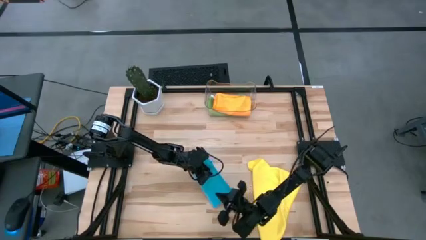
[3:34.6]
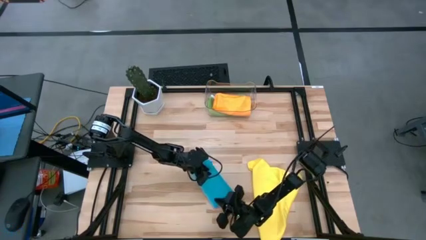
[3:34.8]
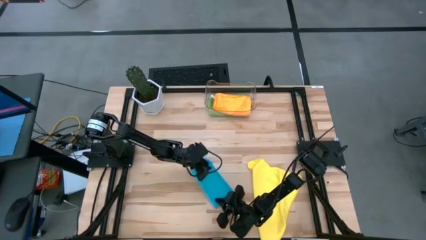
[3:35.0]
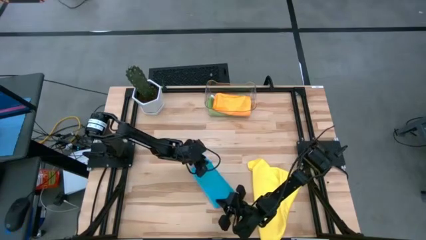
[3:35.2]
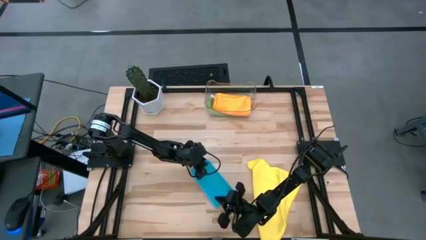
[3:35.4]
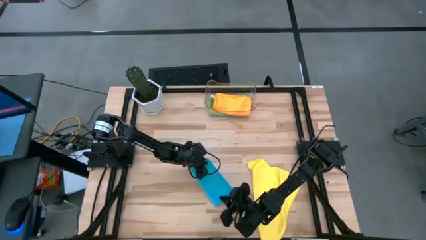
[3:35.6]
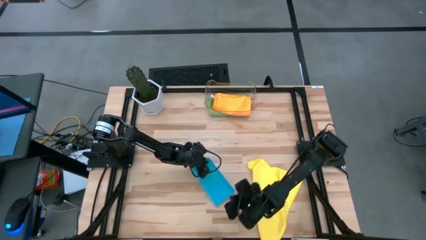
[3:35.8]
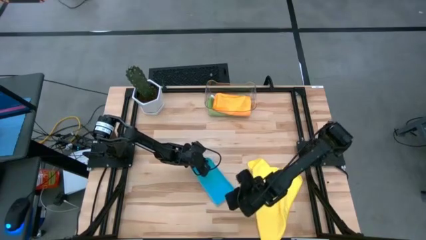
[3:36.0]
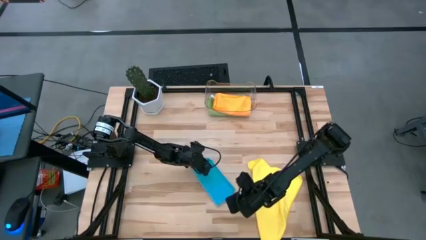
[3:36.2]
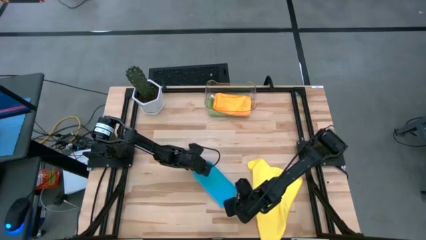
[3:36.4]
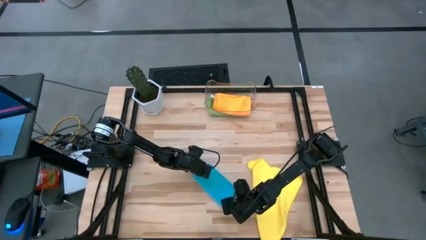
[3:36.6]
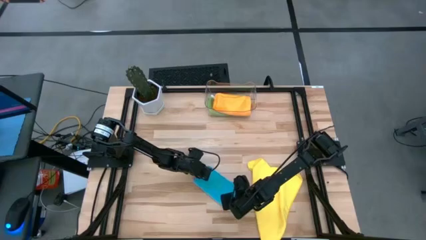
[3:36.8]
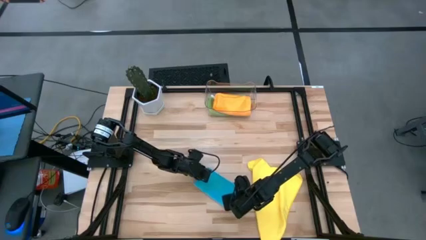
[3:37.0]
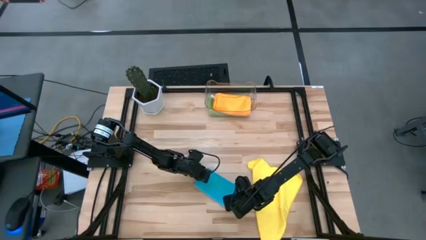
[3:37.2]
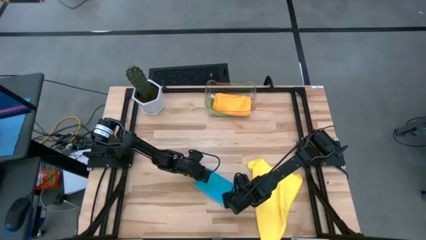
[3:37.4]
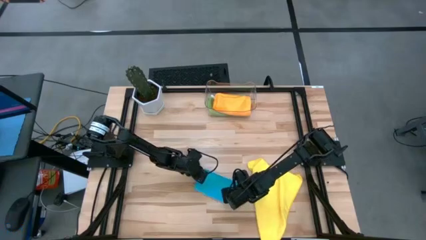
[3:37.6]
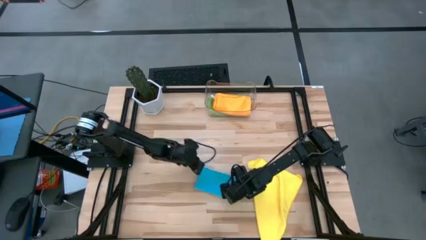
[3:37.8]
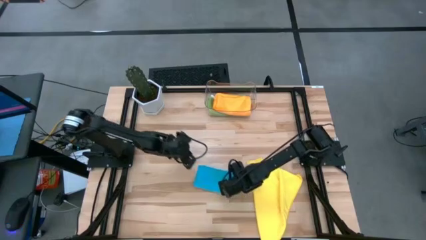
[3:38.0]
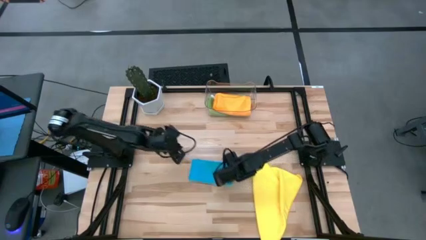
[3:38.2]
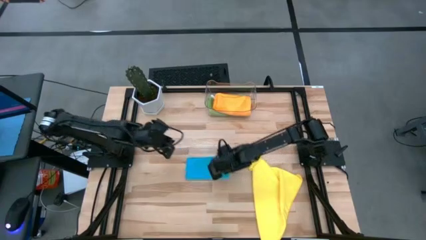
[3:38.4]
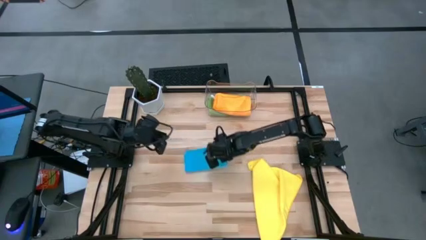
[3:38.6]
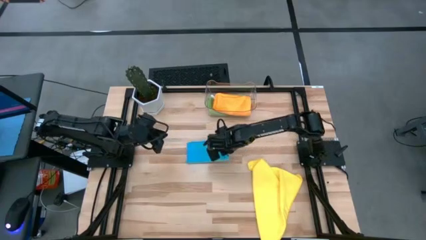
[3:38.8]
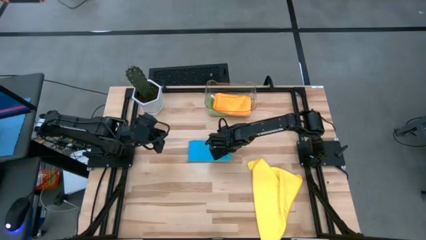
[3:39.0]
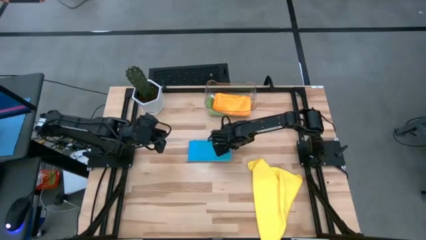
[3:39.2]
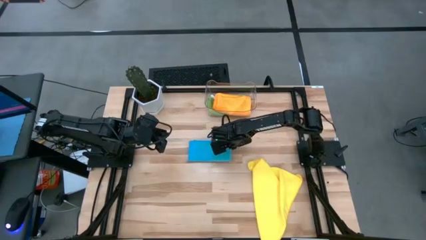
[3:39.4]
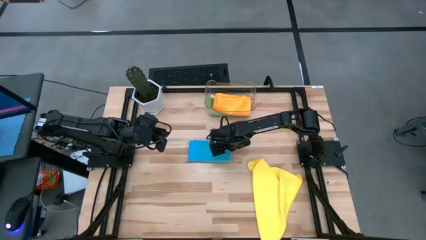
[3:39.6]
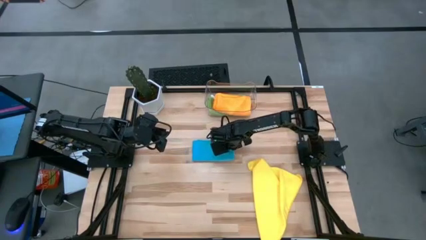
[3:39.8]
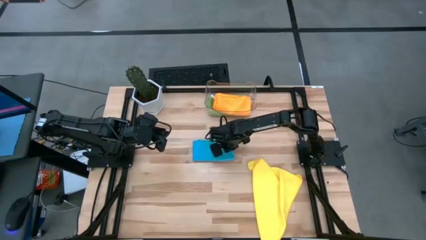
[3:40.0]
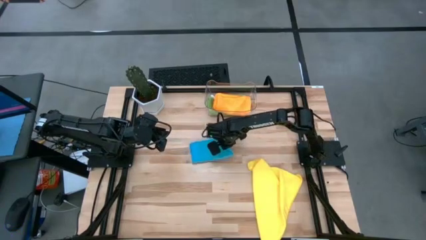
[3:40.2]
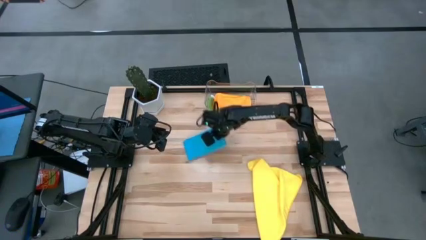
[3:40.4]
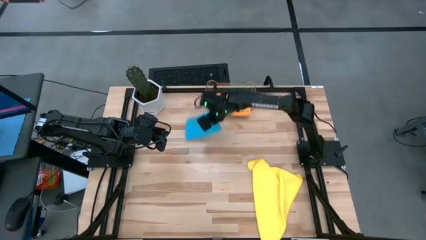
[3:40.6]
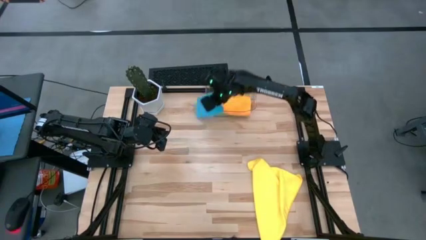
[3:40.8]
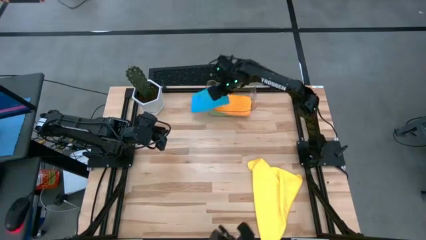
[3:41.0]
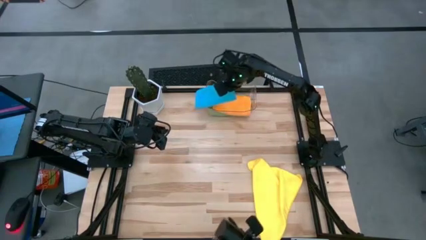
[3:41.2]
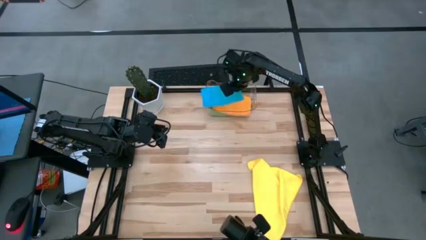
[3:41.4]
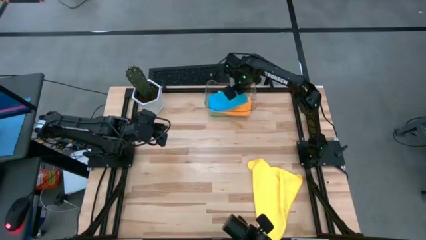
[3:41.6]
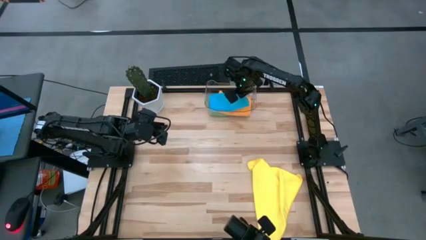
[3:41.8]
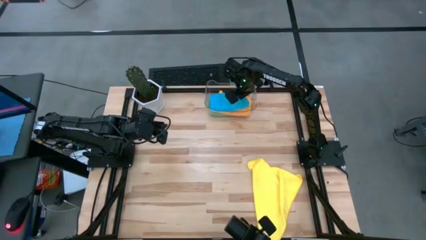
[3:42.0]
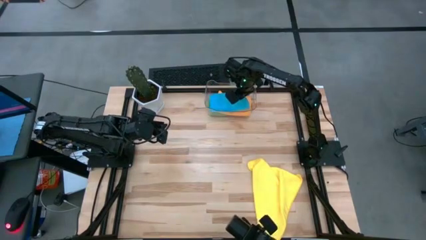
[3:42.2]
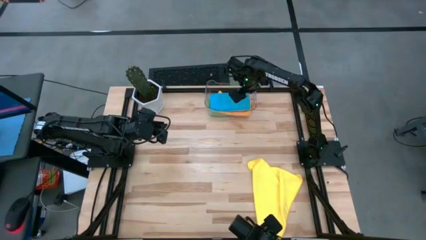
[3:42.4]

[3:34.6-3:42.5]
Task: Fold microfiber towels
Put the blue towel into the transparent bin

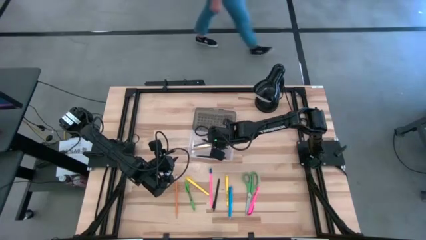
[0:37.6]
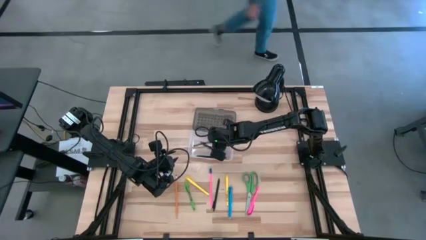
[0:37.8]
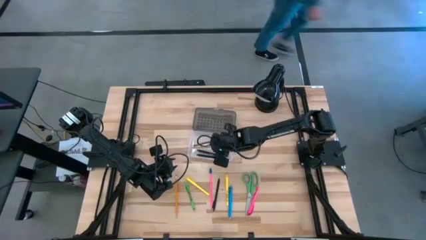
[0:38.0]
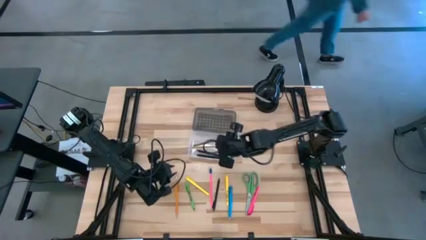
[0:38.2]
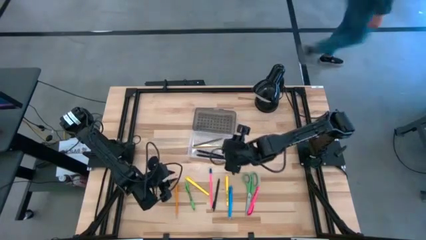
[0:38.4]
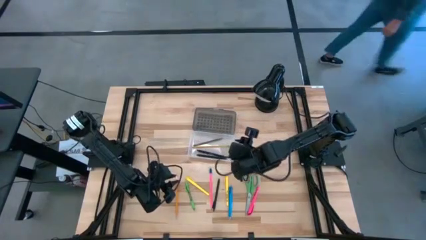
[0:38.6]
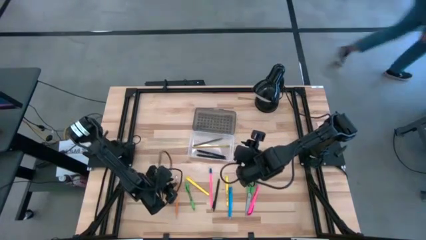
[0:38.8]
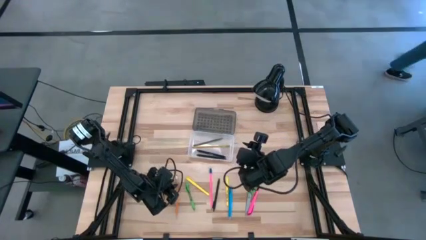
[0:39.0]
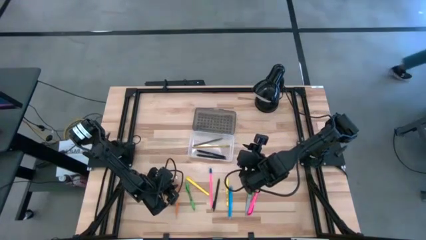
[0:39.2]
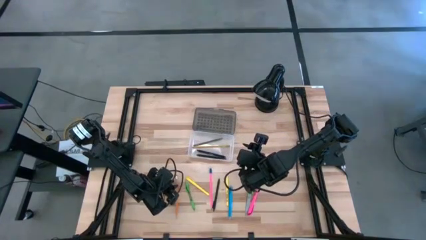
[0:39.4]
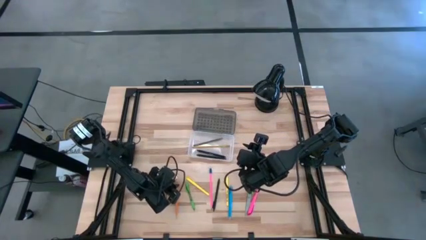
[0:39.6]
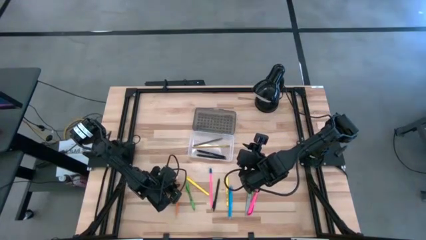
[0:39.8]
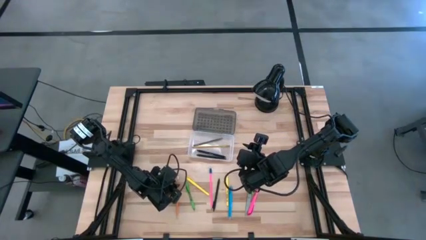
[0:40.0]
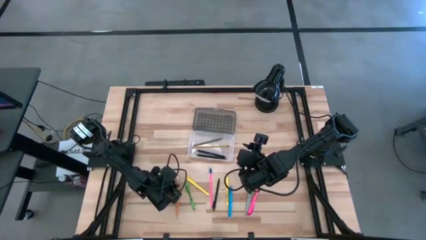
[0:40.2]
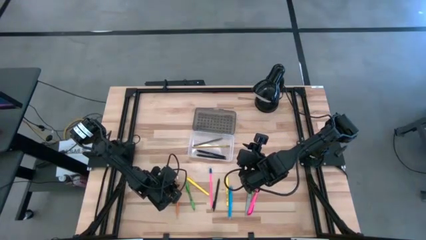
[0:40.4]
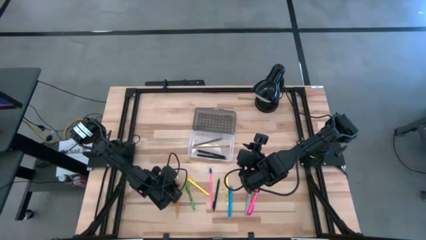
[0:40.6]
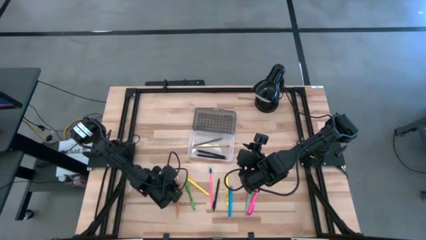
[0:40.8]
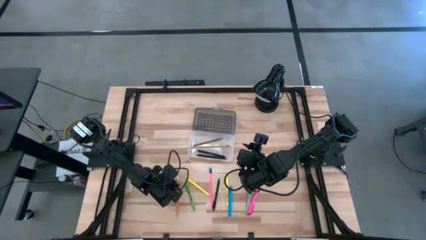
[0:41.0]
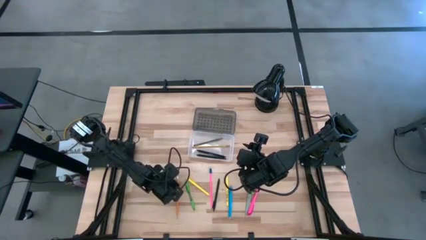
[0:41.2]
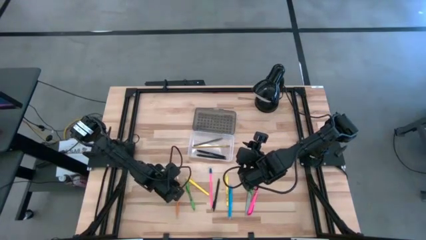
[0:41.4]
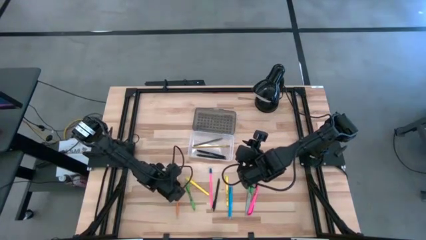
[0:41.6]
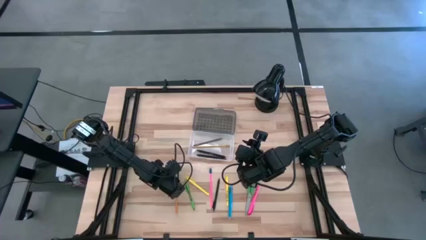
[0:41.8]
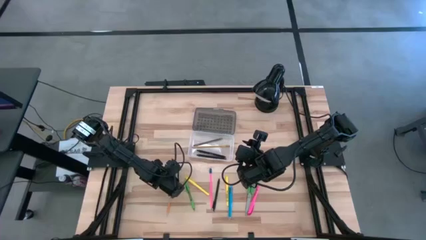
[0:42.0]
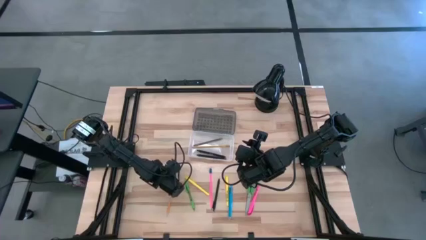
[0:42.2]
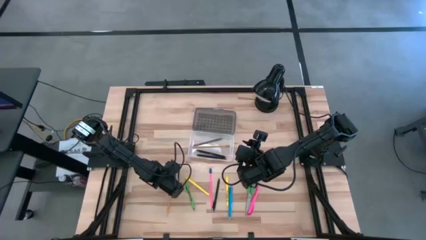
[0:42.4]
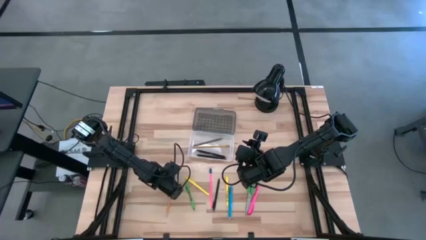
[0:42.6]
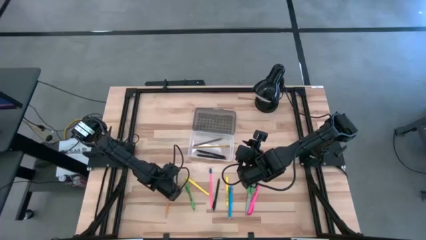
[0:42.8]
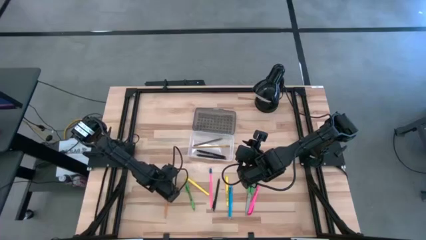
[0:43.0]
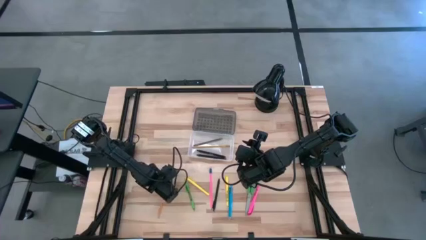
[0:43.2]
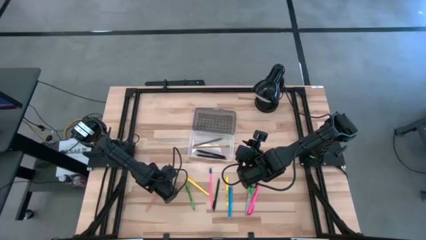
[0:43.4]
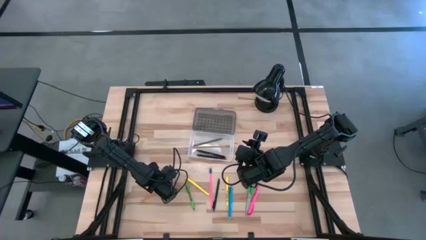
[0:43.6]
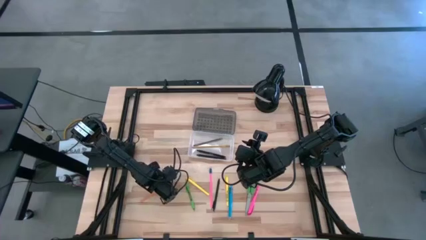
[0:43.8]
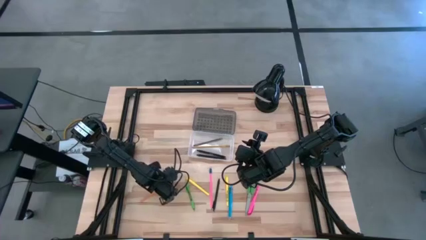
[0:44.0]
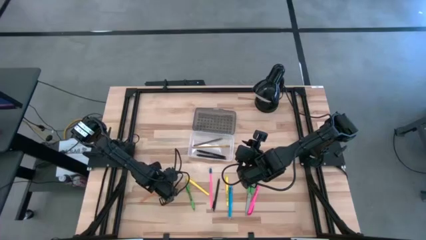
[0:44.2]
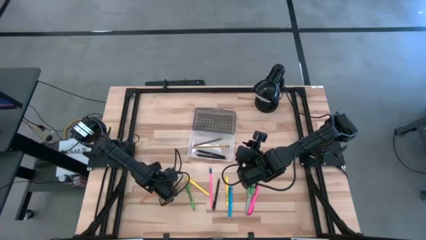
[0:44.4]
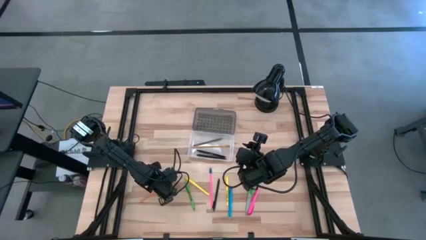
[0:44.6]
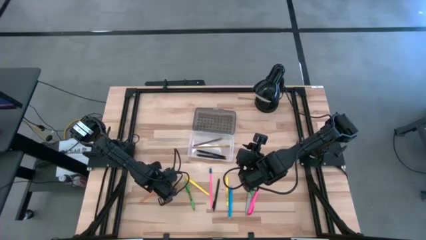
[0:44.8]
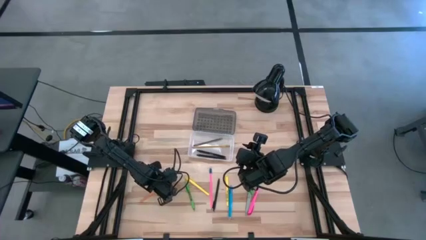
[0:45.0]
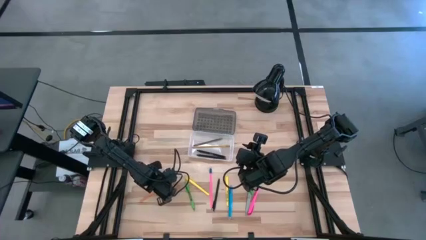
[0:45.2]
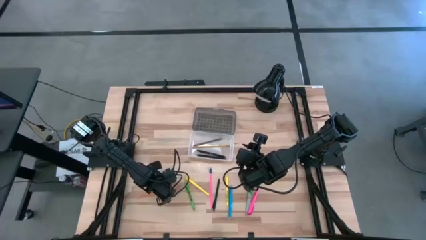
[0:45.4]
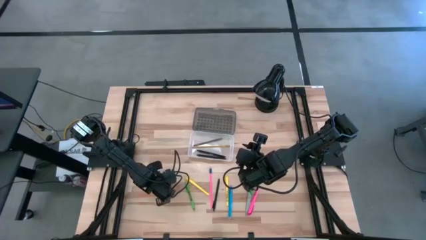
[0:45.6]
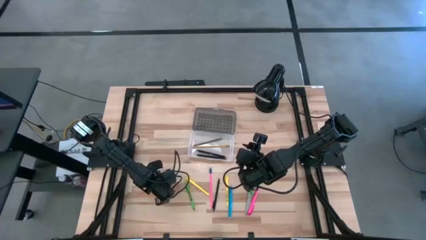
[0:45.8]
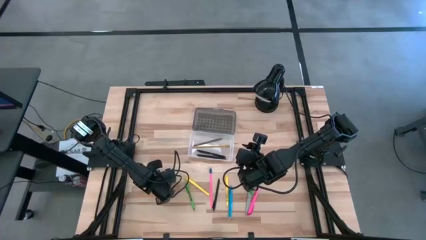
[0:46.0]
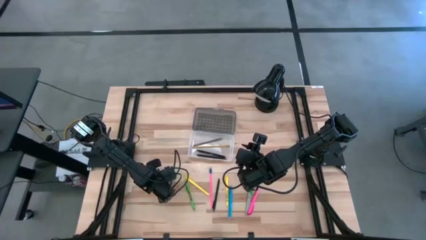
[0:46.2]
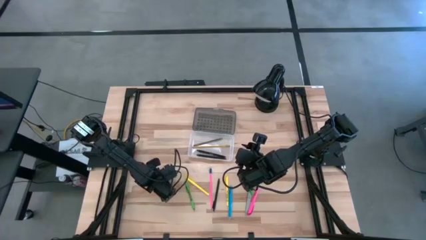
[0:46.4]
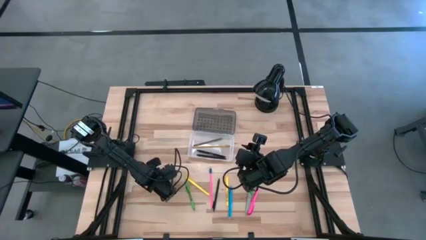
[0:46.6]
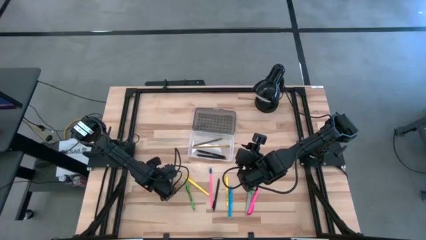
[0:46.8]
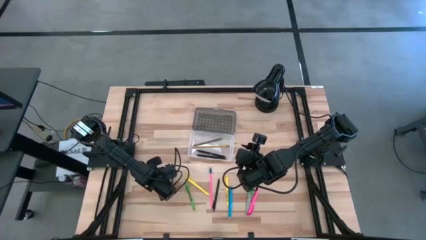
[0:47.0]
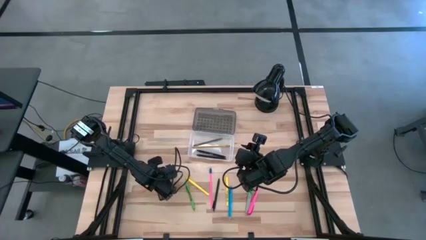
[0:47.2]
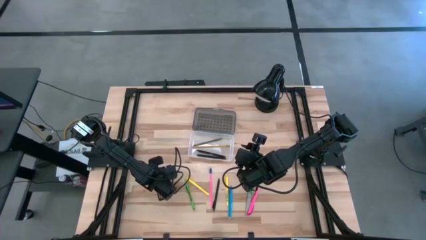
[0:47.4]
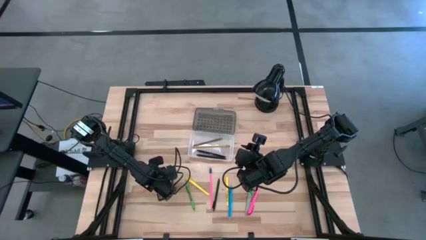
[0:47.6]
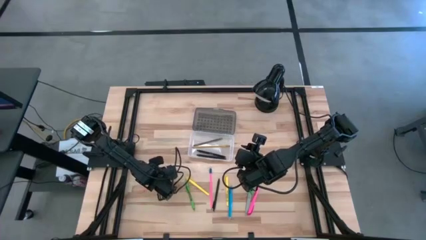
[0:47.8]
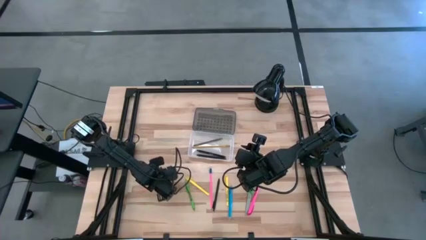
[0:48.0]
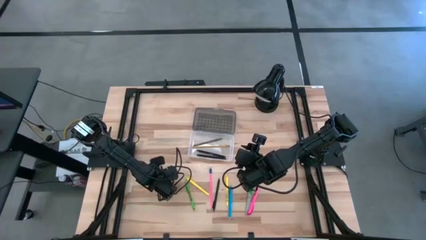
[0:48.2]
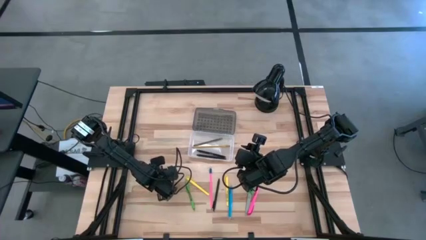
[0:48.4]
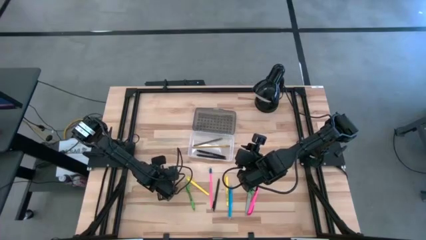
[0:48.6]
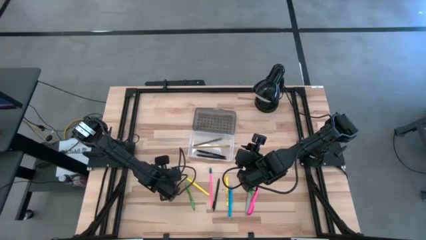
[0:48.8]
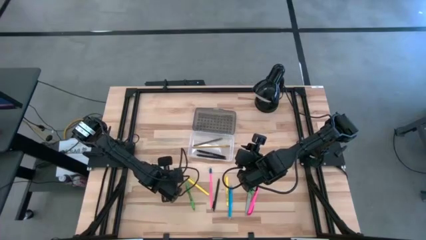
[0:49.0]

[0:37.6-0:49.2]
Task: Pick & place school supplies into a supply box
Put the orange pencil into the transparent supply box
